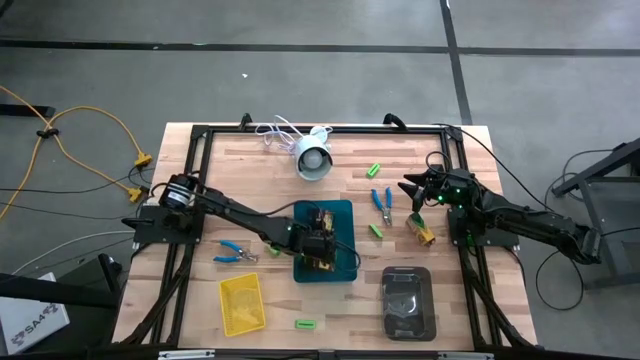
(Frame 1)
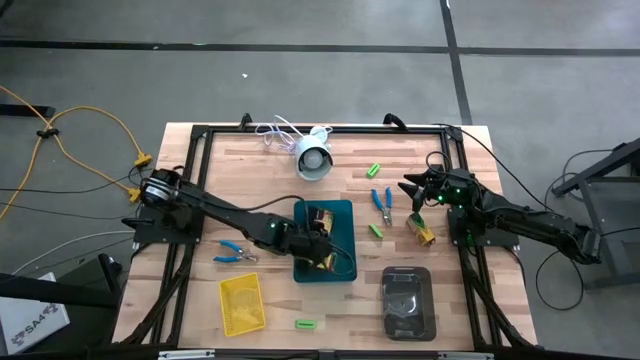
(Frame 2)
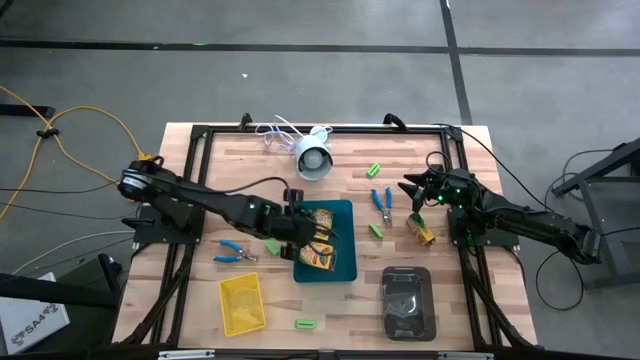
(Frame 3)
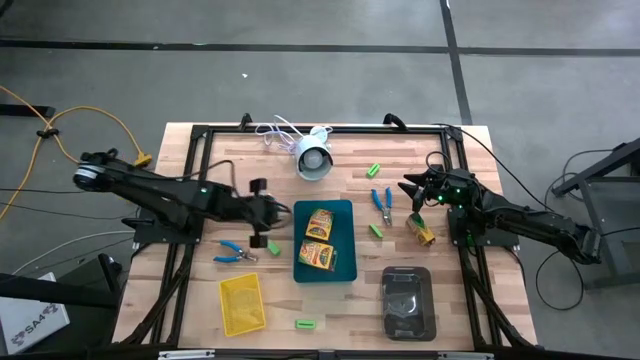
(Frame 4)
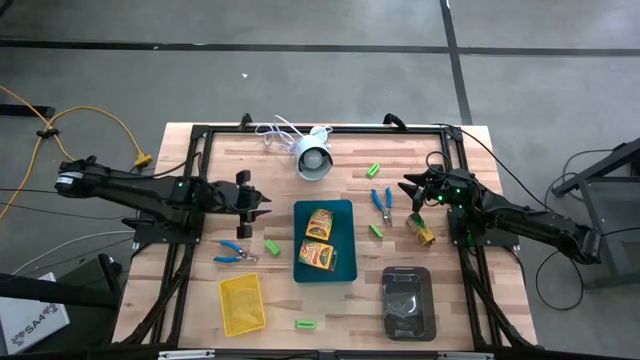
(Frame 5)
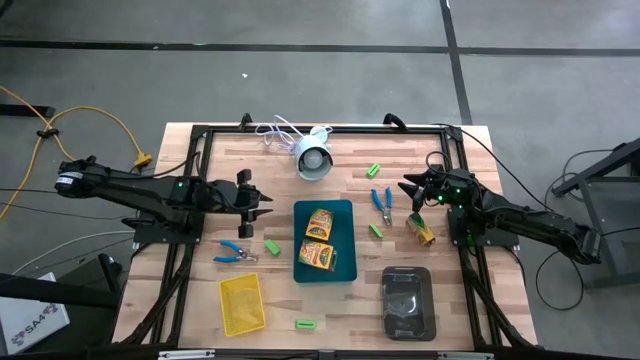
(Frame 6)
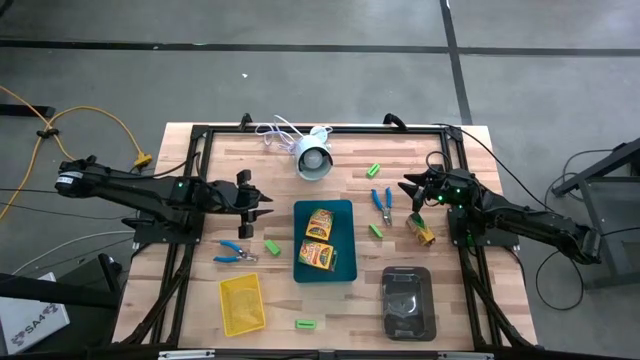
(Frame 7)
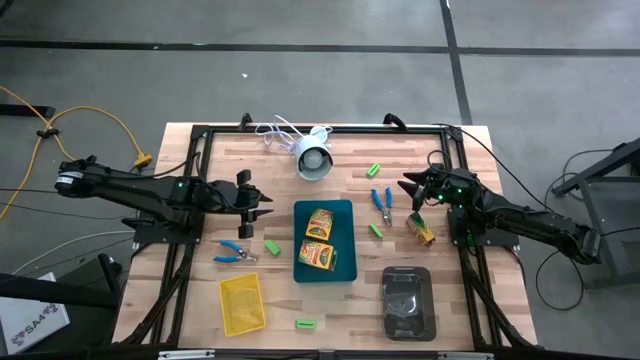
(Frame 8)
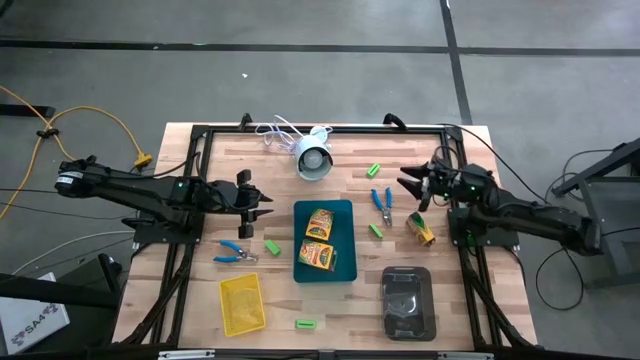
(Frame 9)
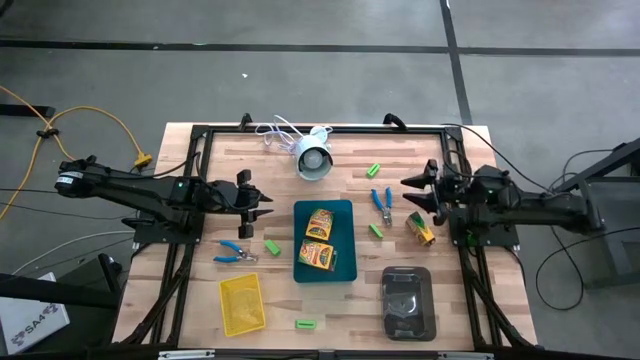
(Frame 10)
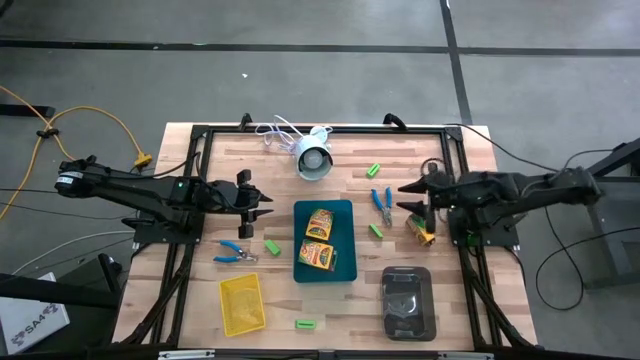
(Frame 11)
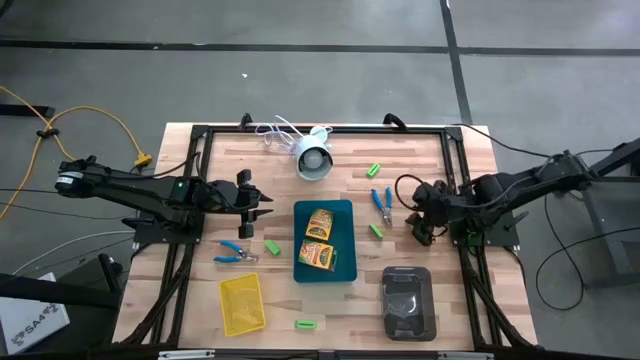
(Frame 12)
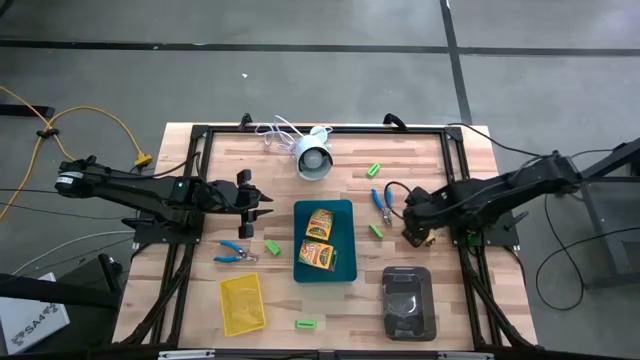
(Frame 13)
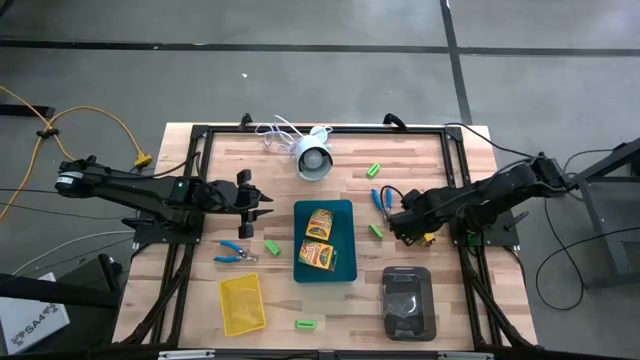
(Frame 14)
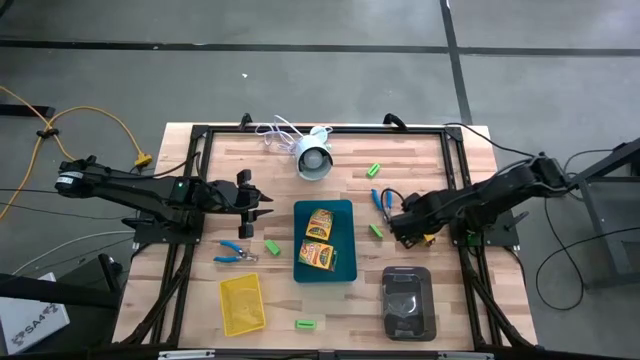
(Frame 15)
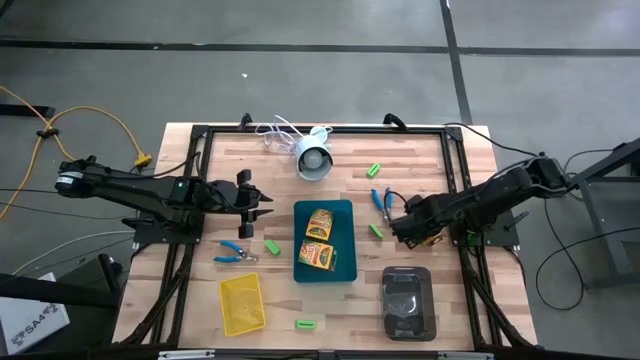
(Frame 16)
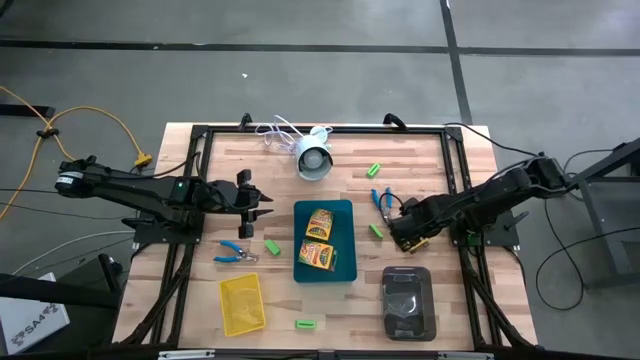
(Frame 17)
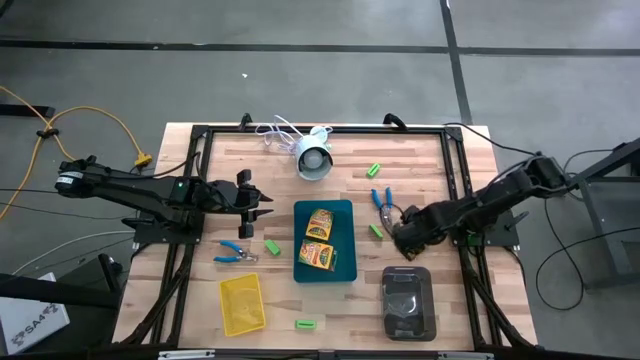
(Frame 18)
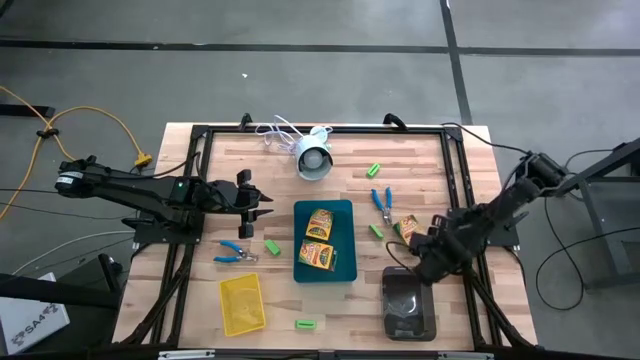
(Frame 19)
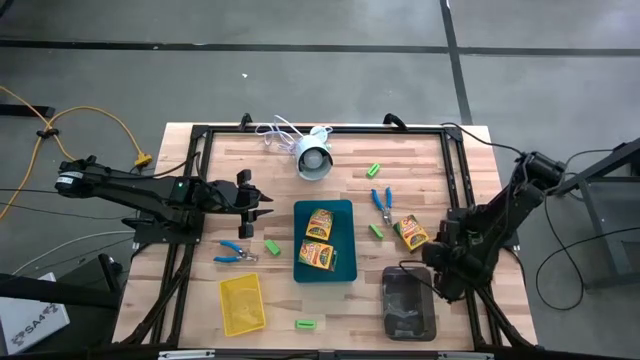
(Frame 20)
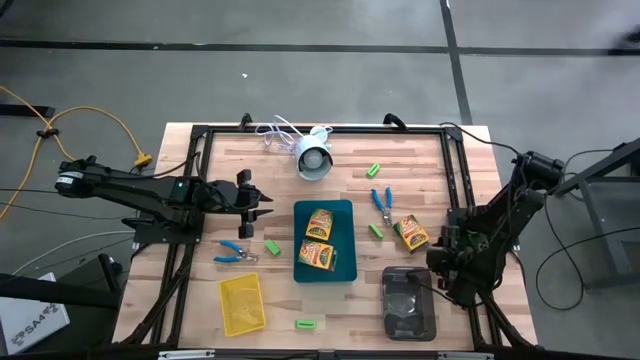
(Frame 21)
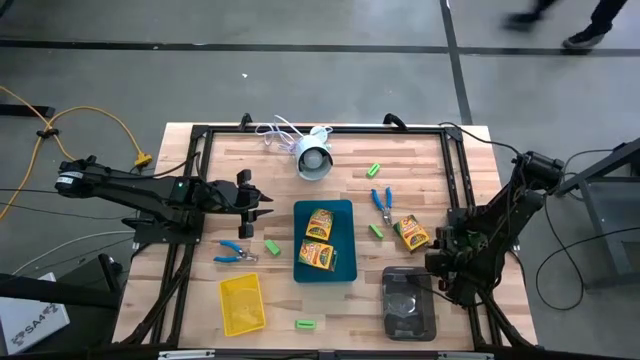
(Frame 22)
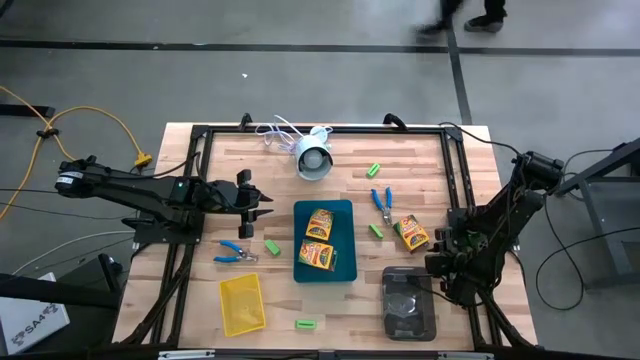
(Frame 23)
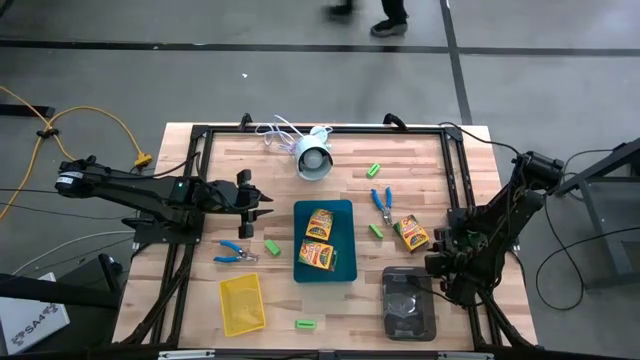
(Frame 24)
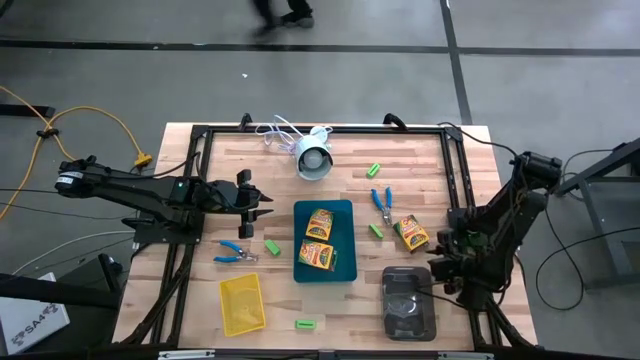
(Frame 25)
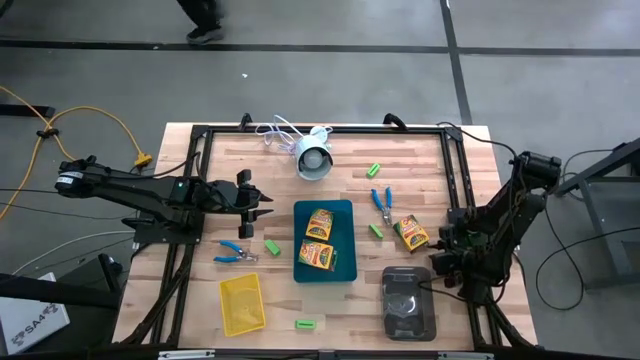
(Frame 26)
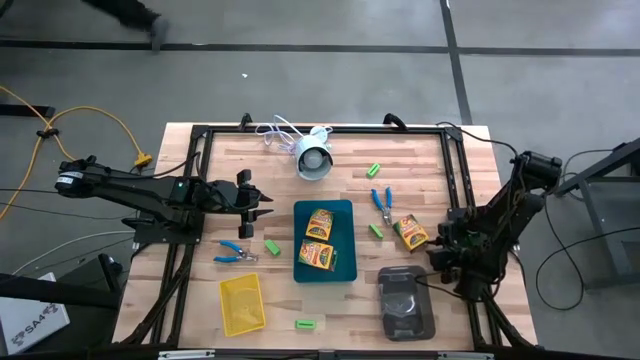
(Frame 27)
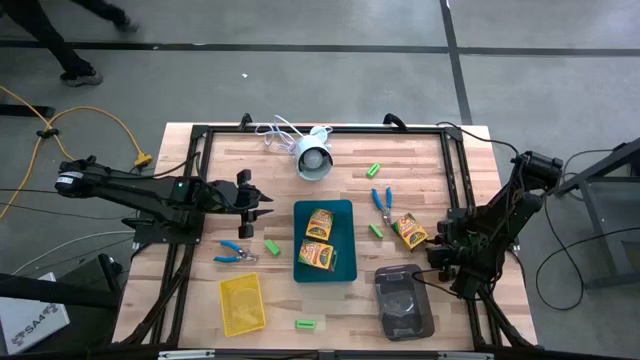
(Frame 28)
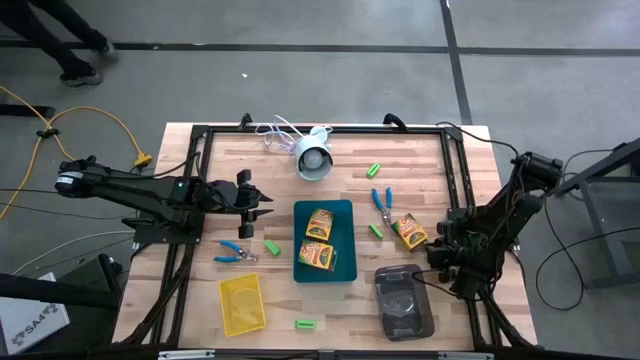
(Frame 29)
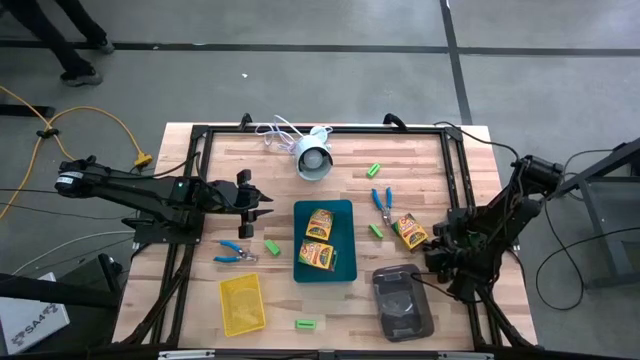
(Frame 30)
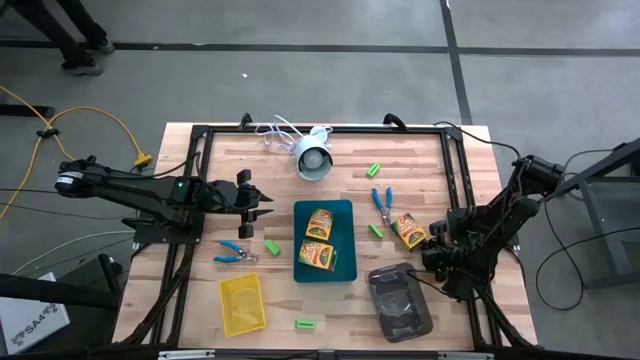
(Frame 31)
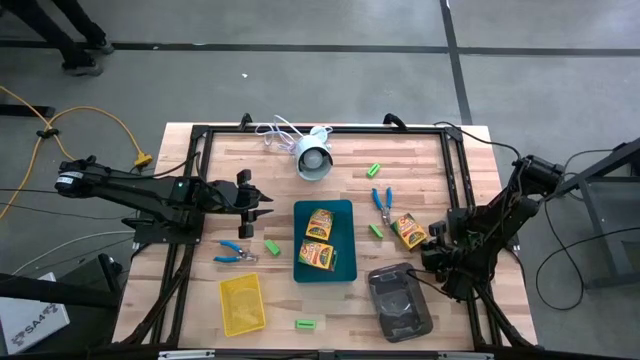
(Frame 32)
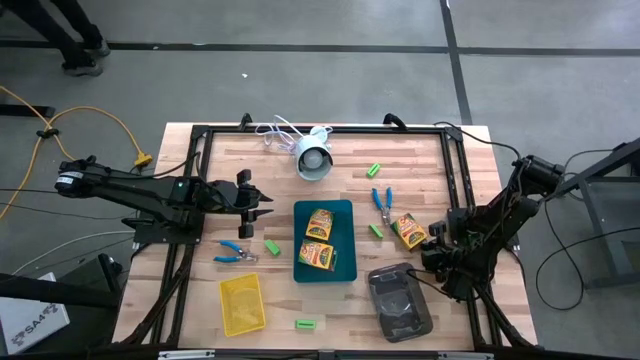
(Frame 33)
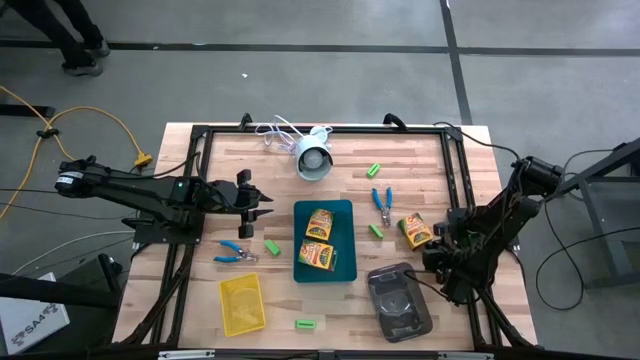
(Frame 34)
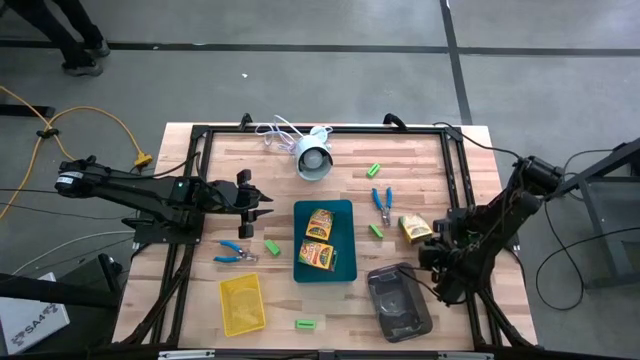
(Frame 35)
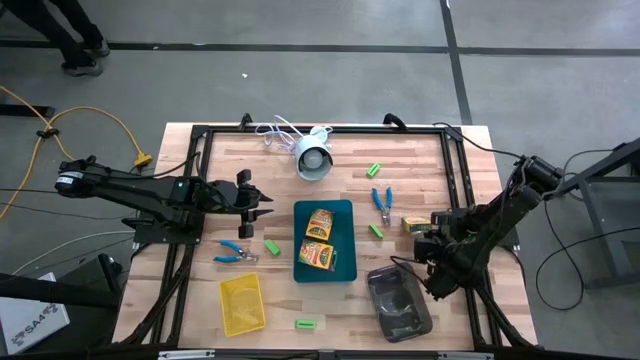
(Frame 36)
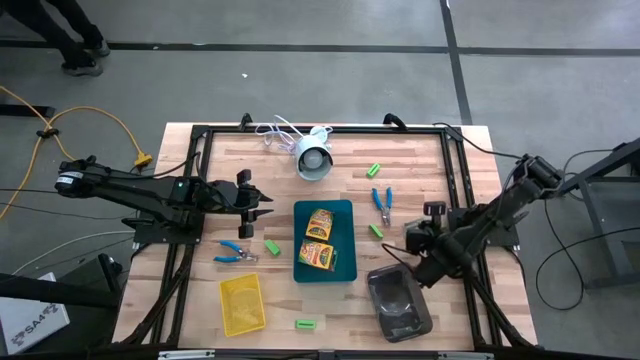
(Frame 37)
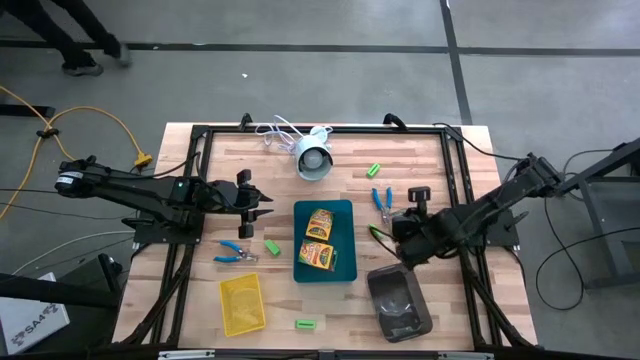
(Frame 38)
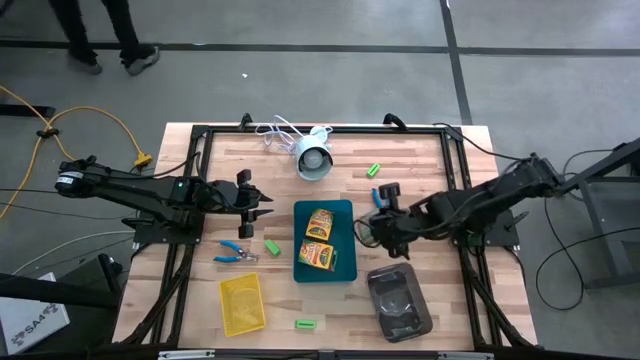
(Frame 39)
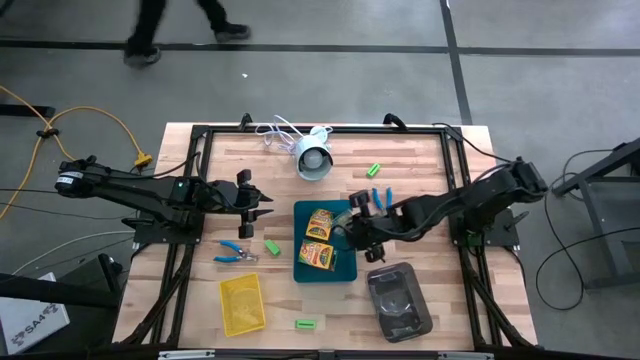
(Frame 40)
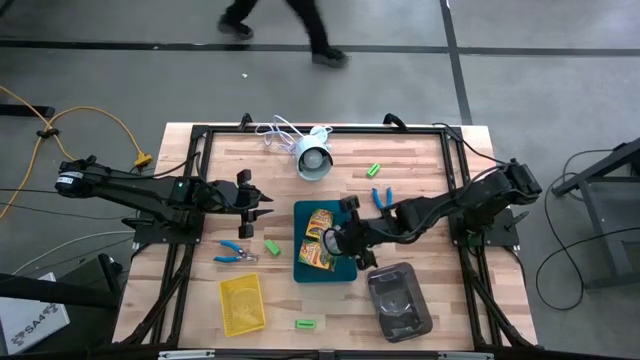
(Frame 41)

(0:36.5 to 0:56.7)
Task: Pick & Place School Supplies
Put the yellow crayon box into the blue bin

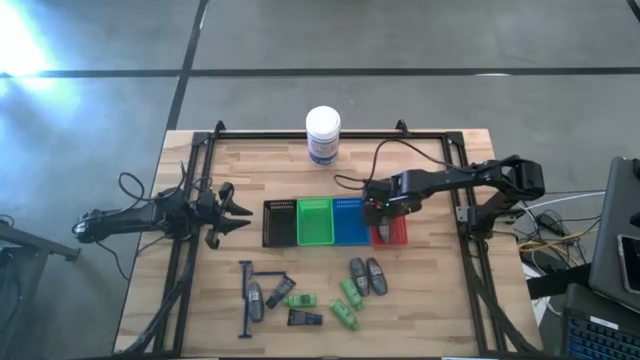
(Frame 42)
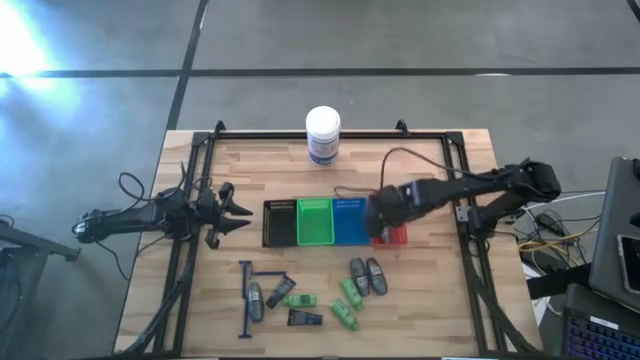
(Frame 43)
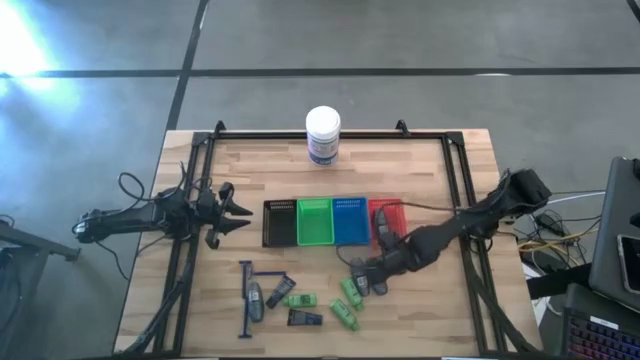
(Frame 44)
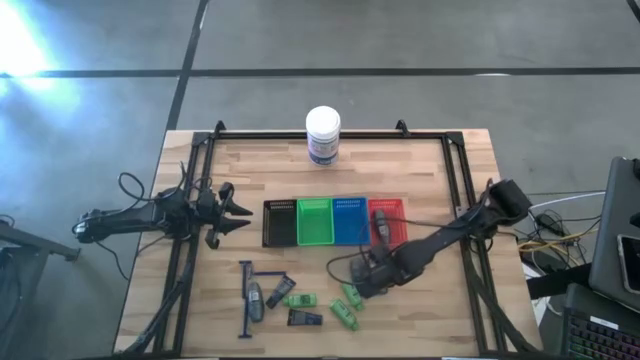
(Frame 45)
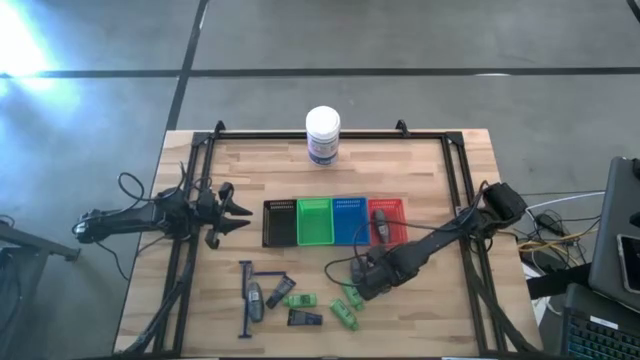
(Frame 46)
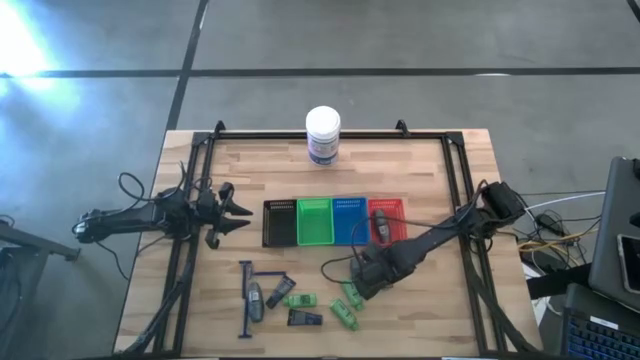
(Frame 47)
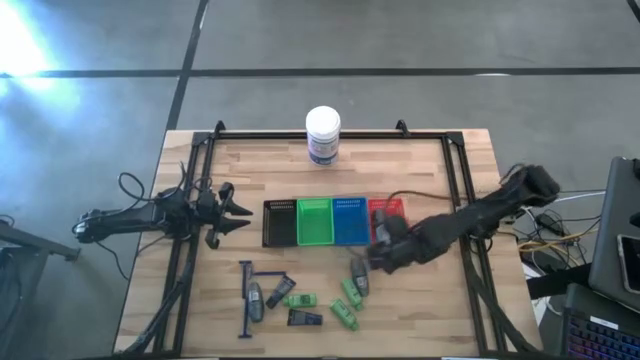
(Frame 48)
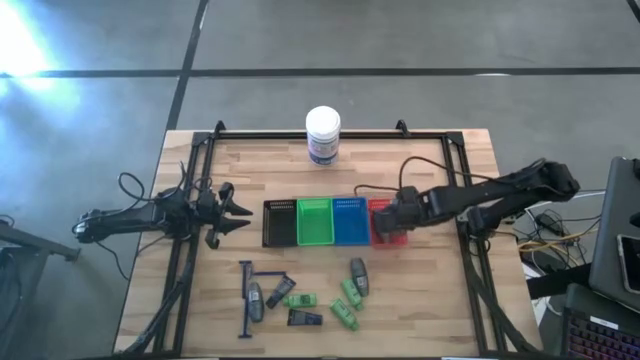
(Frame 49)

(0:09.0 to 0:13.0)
Task: Pick & Place Travel size toiletries
Put the black deodorant into the red bin
